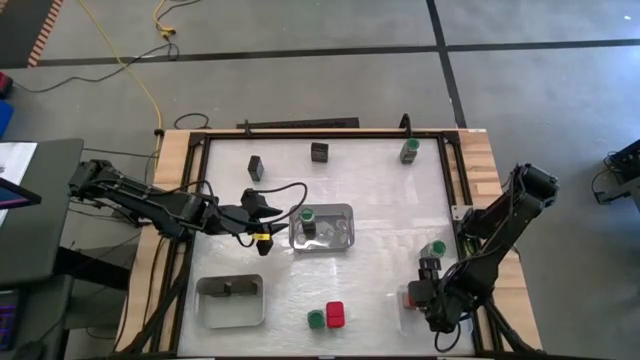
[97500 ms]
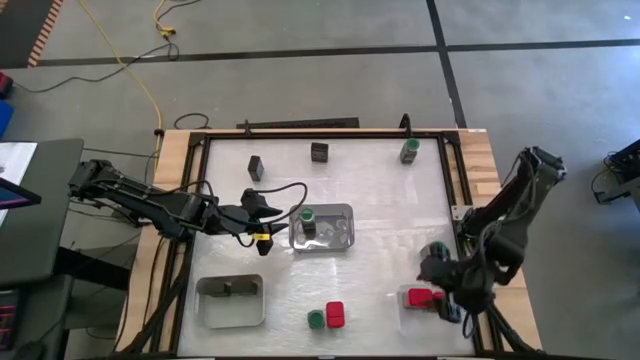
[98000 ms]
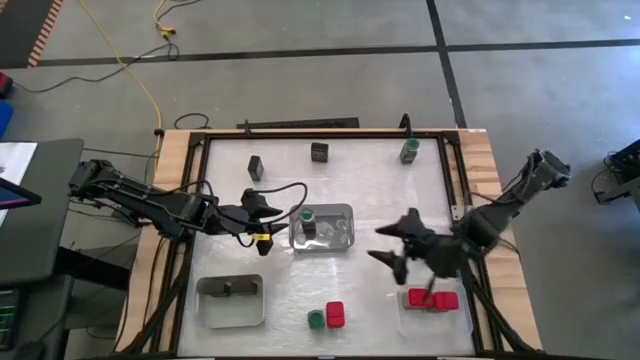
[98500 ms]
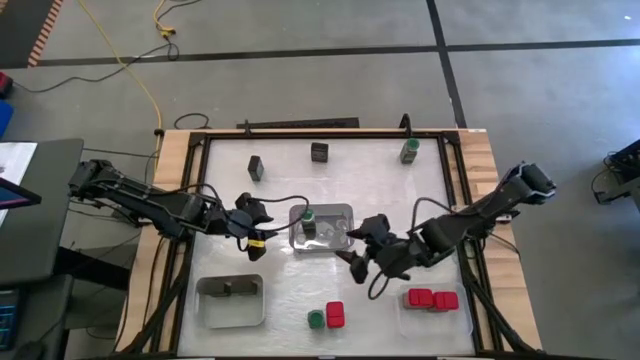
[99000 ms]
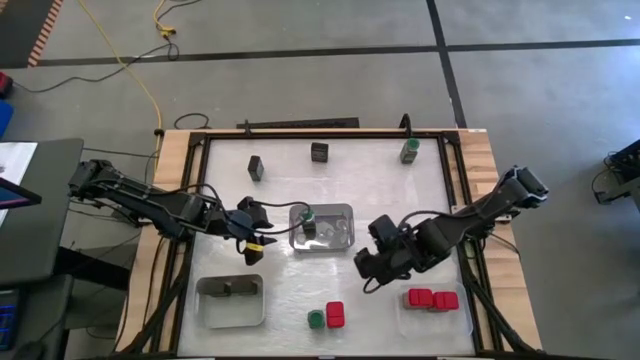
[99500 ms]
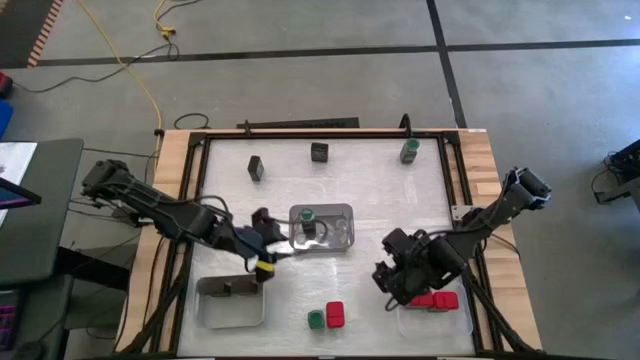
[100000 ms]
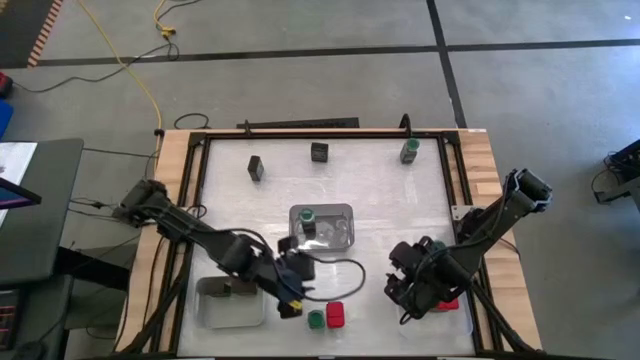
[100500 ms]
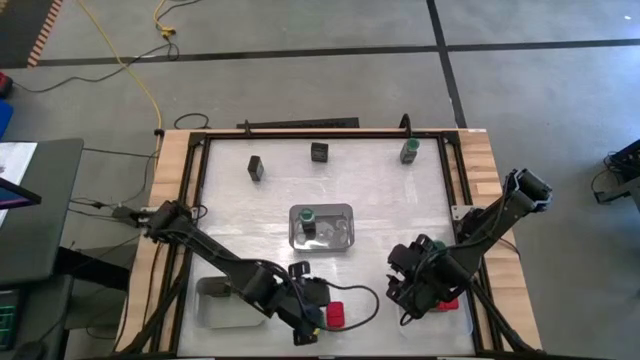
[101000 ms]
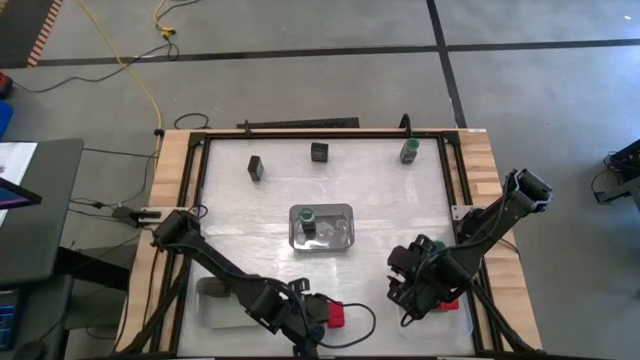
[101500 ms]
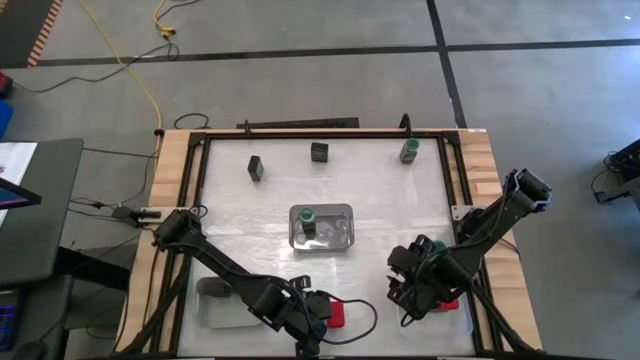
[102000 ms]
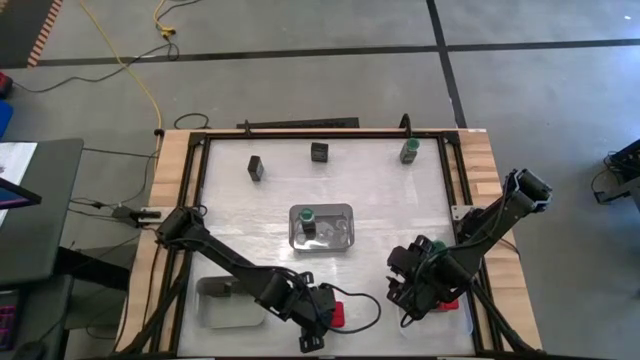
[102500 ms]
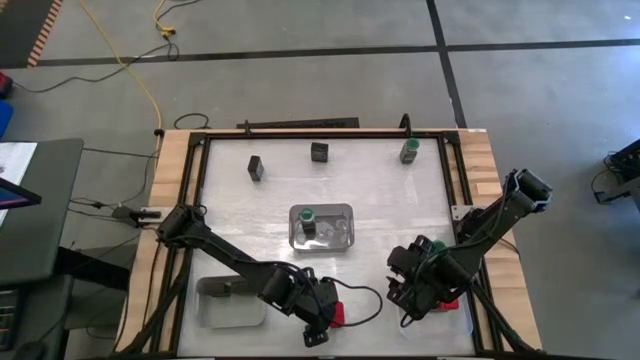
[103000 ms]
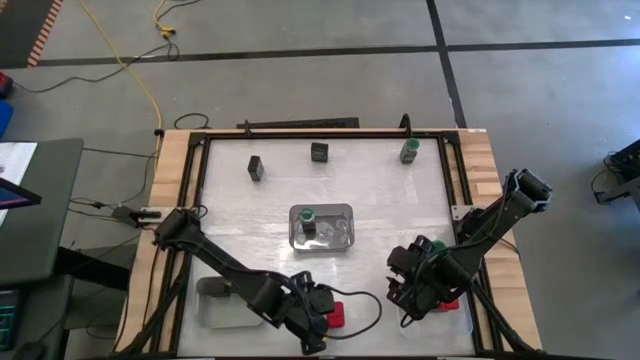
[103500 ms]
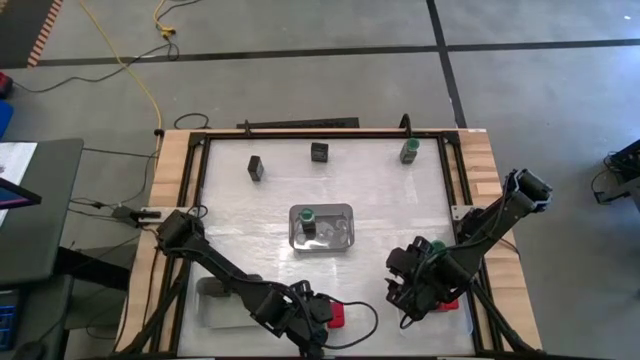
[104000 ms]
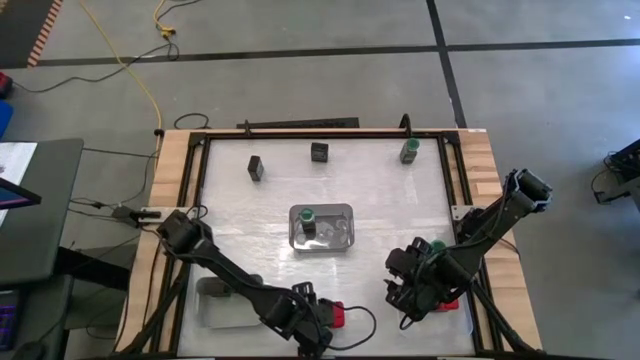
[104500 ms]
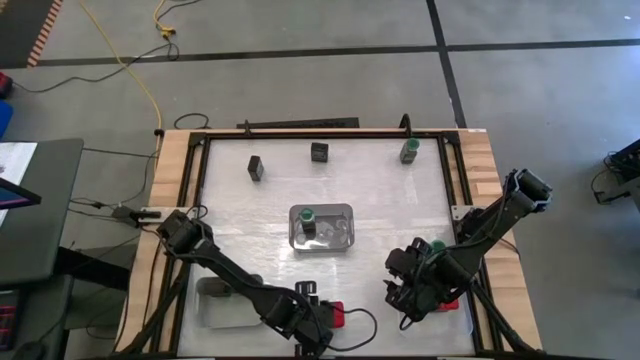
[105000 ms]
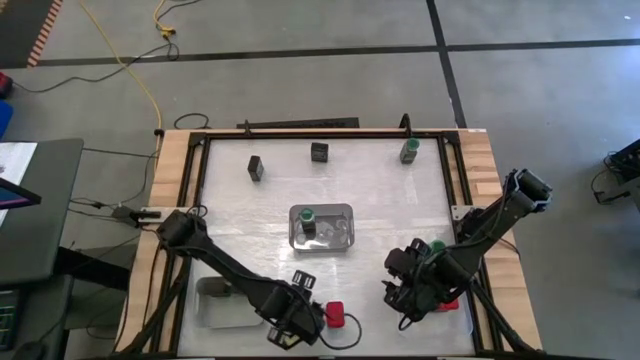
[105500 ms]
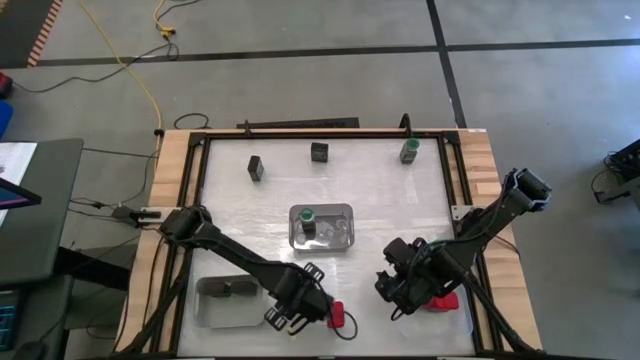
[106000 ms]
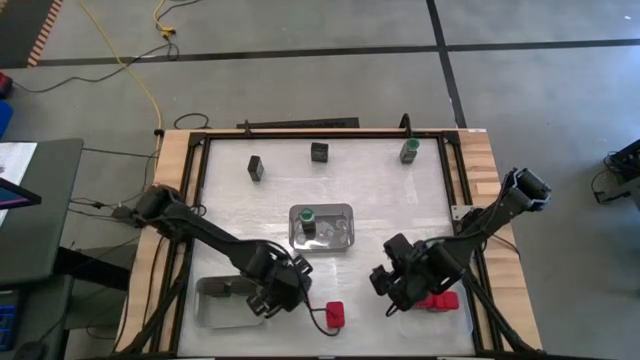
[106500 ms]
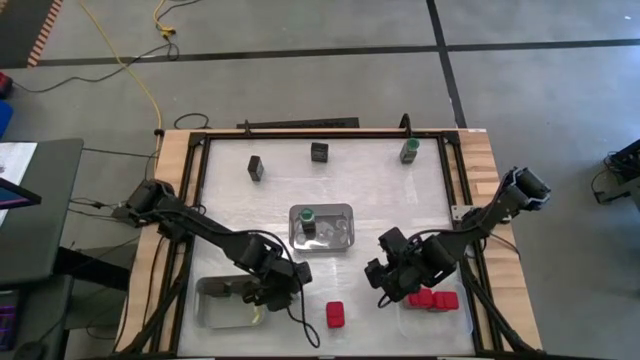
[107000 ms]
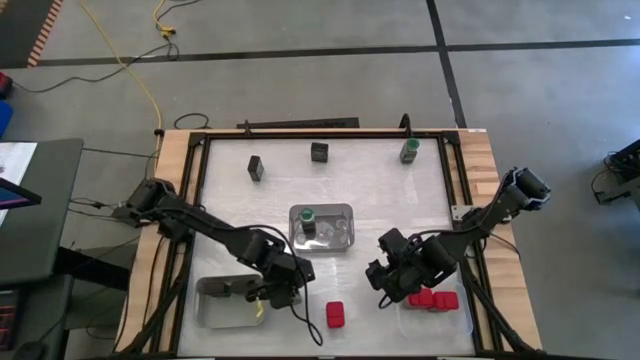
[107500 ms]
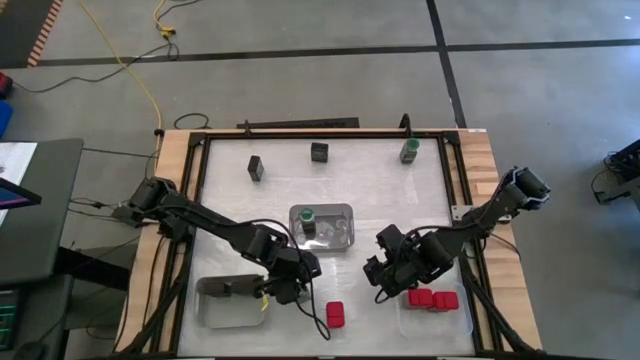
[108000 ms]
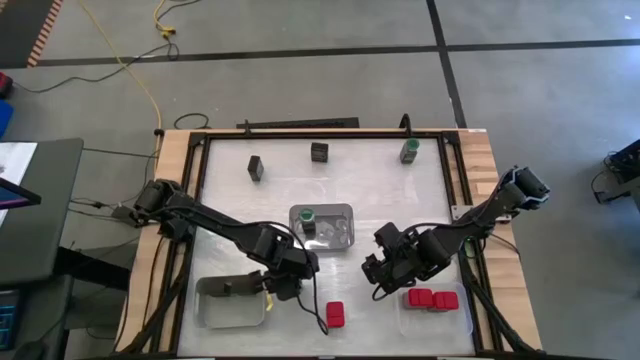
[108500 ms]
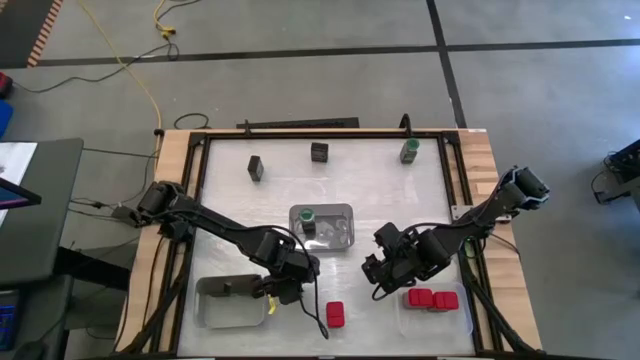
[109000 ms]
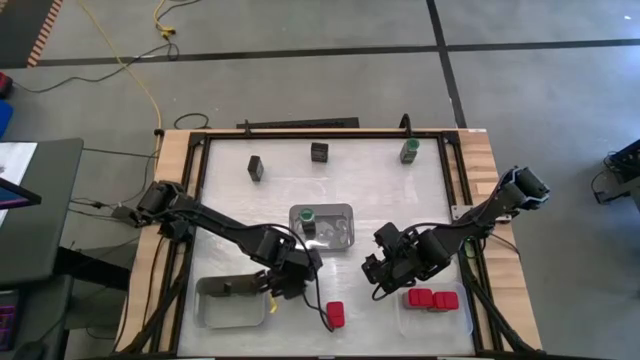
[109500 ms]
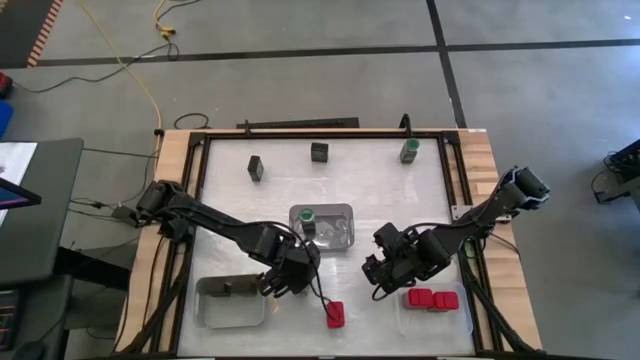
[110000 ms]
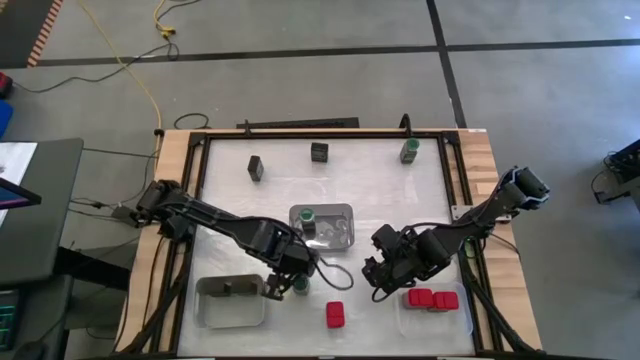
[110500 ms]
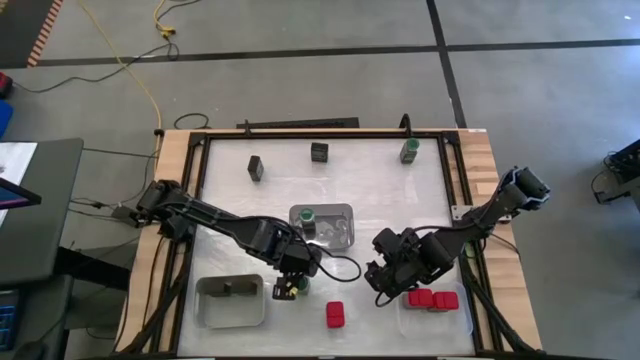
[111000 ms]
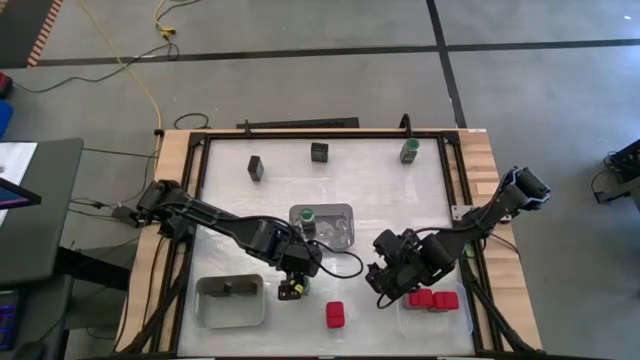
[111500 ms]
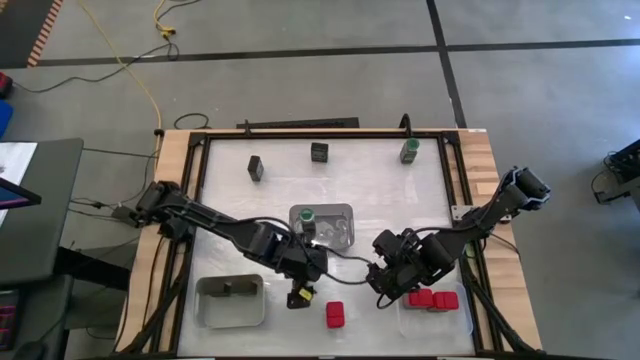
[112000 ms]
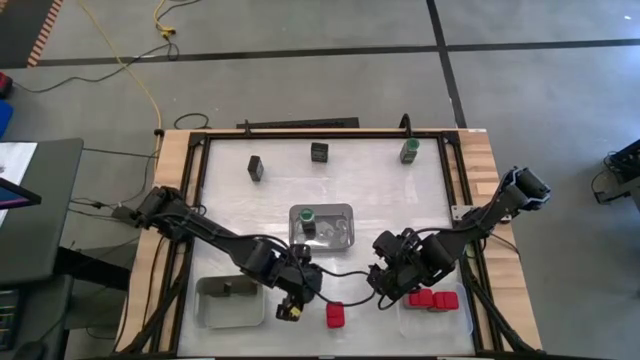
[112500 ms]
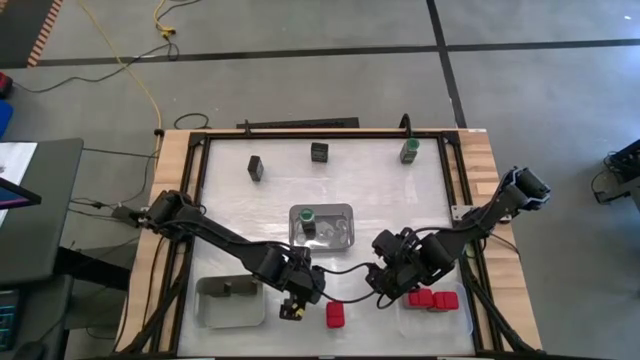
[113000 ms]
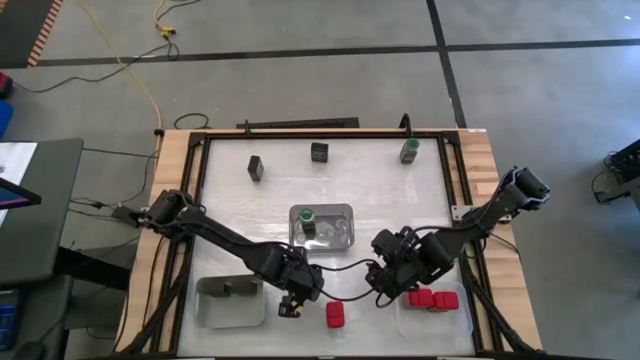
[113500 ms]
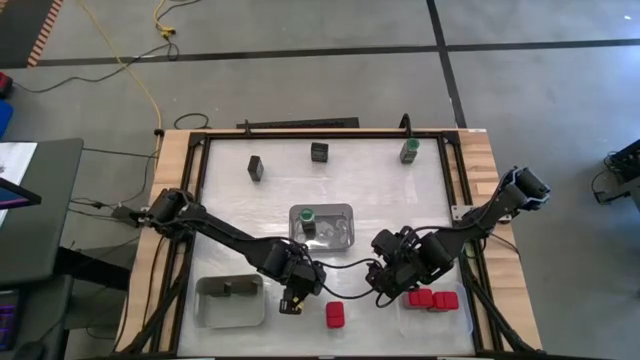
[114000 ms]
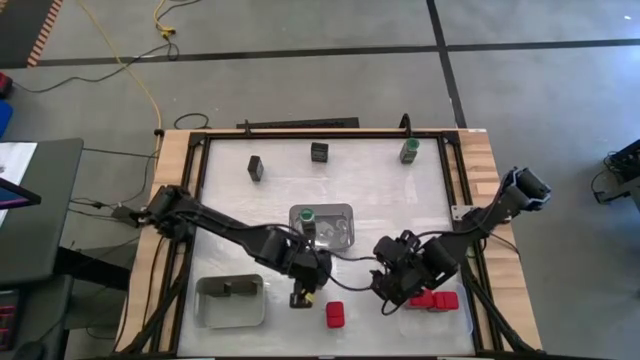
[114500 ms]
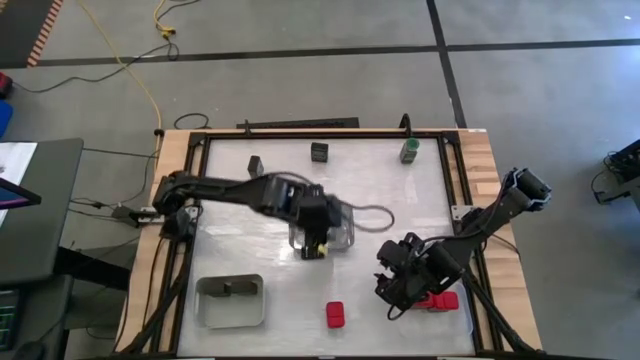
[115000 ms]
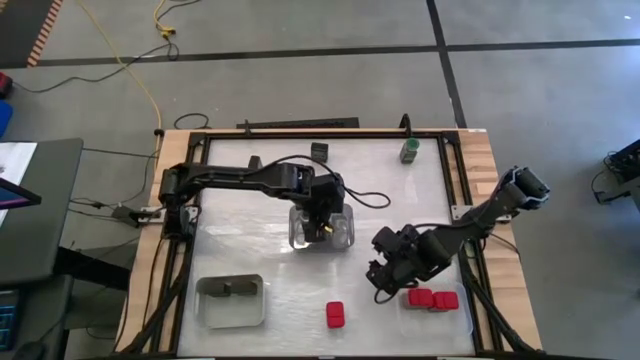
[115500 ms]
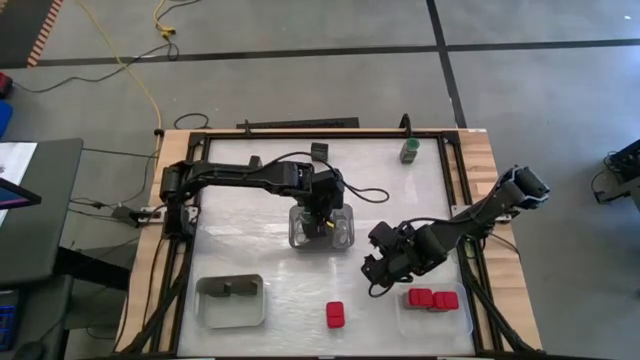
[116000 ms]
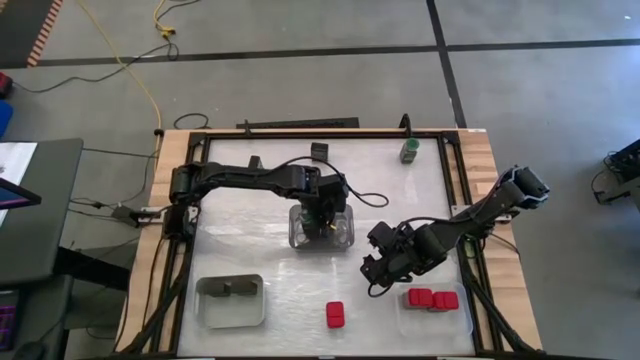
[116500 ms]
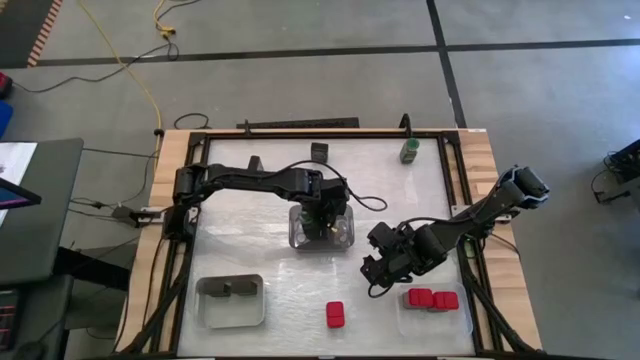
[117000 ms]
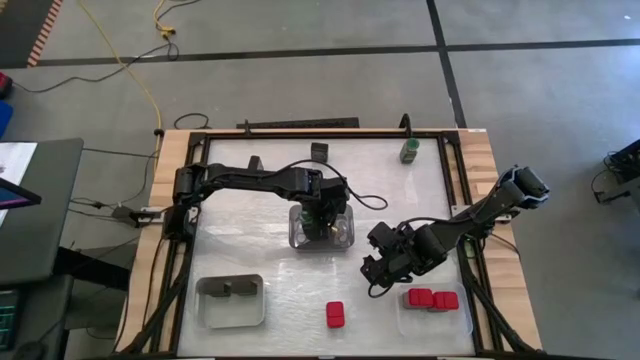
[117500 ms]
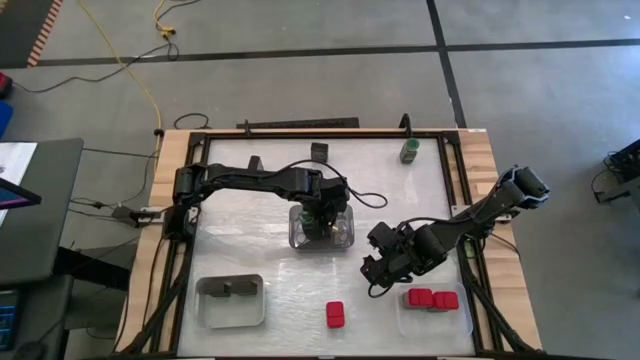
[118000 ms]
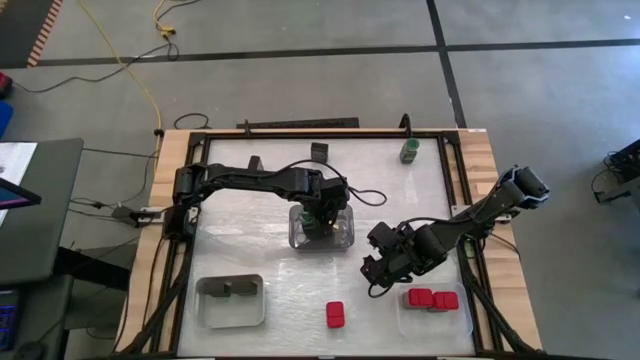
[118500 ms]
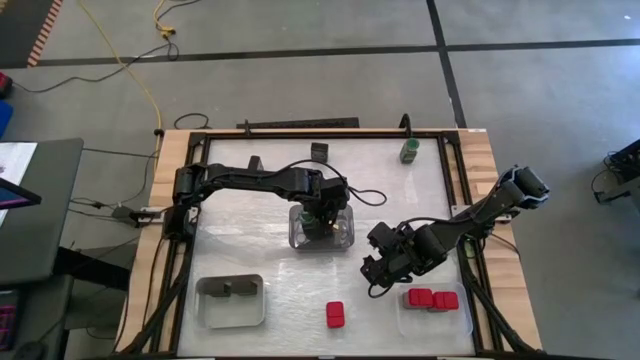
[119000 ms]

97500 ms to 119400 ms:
Task: Sort spices by type
Put the bottom green seasoning bottle into the black bin
